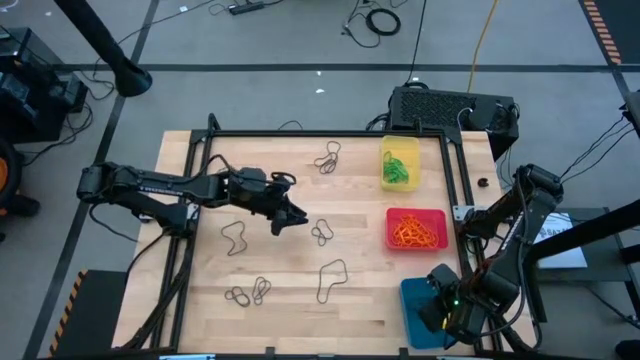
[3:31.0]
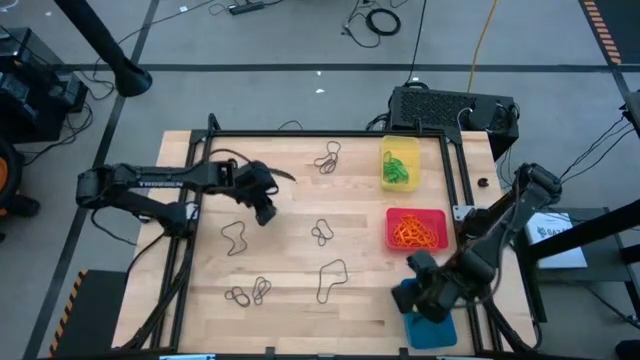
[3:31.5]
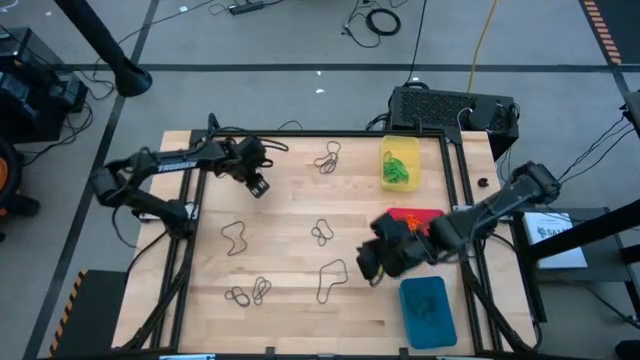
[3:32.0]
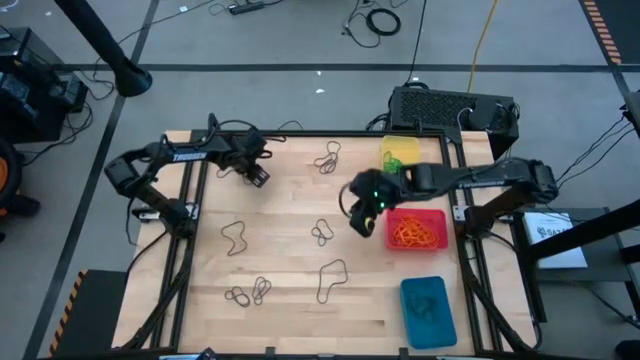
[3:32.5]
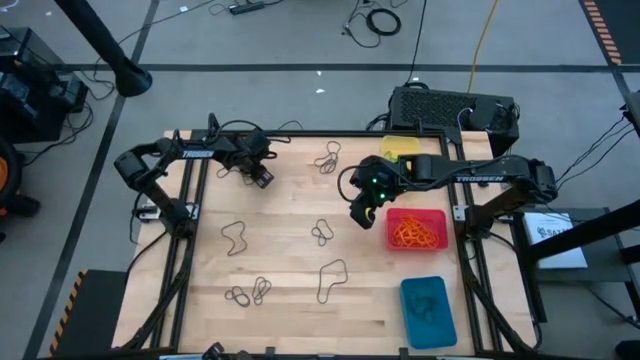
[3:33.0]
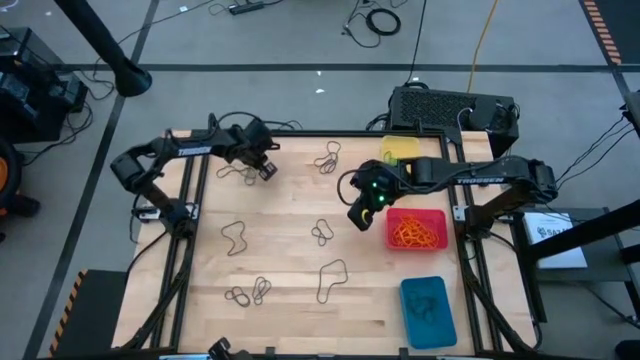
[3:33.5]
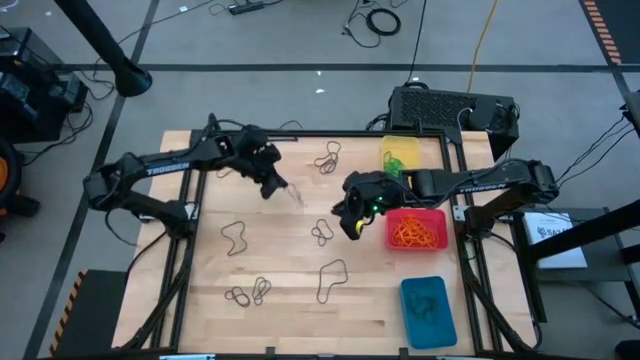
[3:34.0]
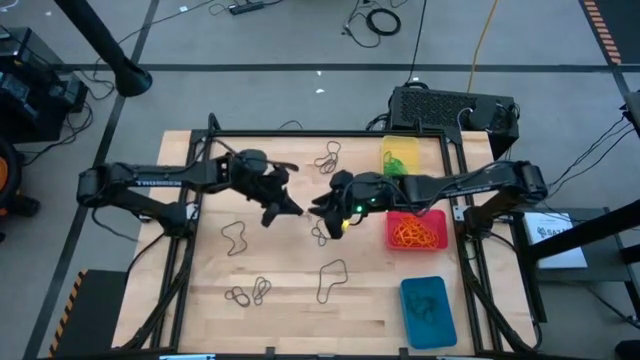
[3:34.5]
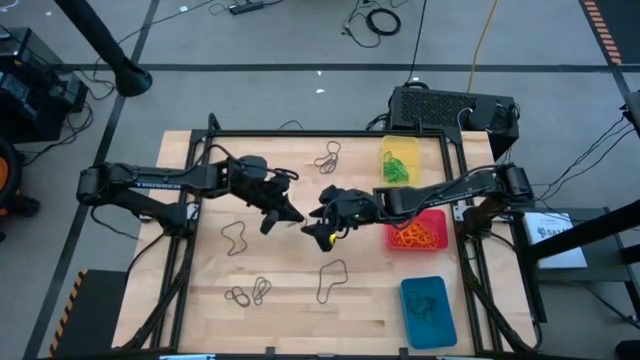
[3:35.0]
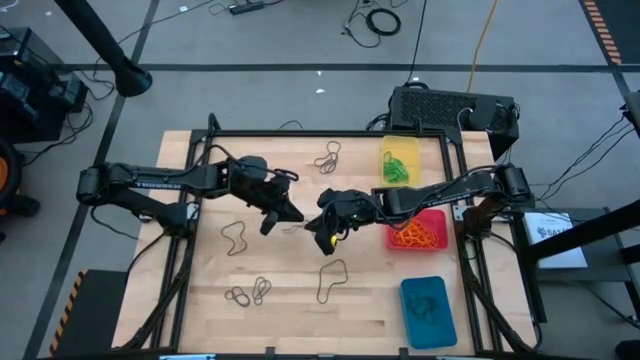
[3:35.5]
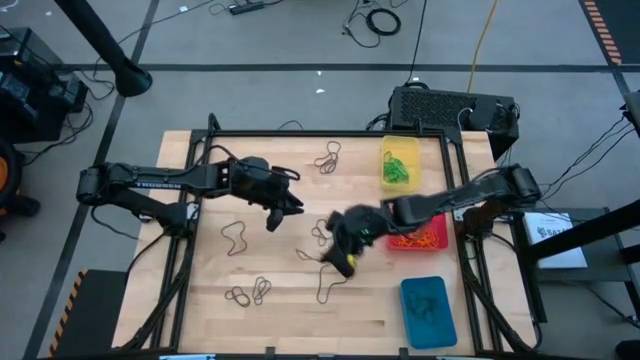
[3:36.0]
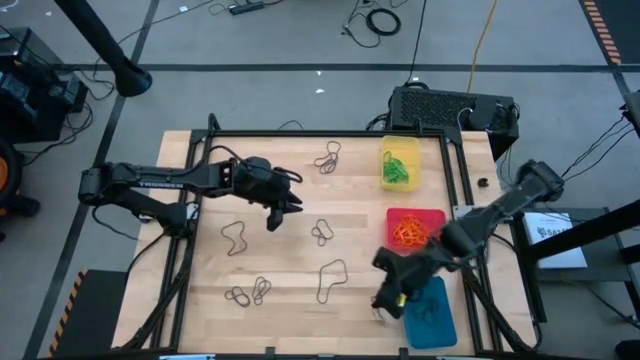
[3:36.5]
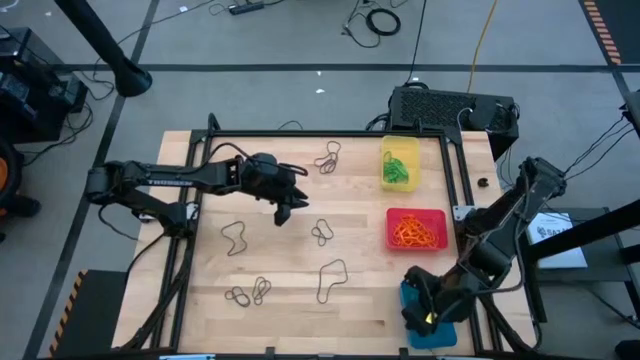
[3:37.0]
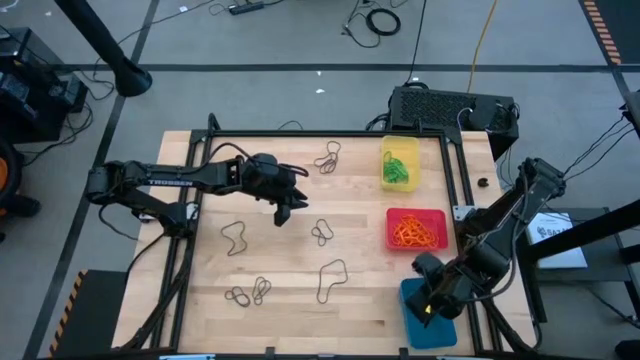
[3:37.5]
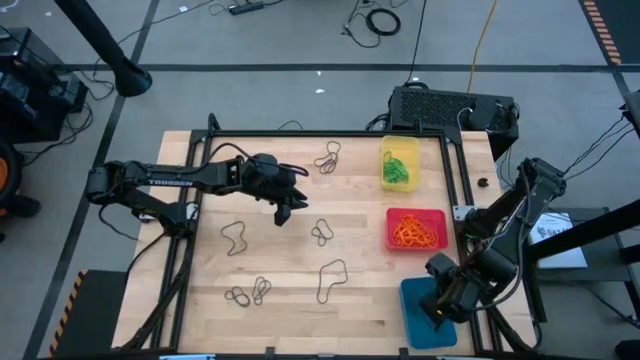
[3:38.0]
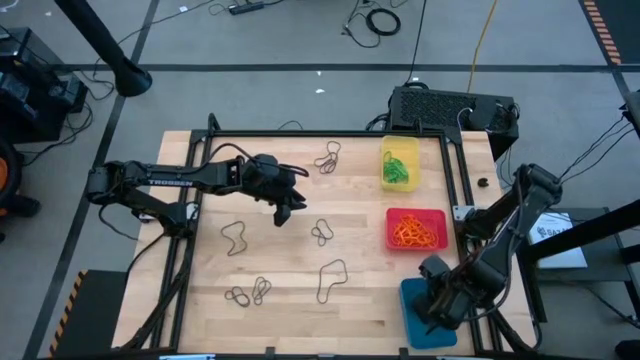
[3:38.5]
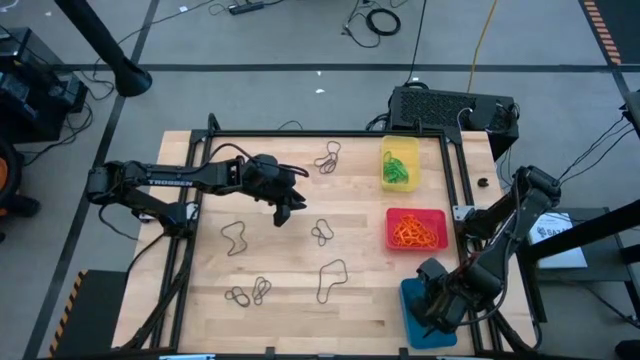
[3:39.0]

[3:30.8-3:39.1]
Task: Sort rubber bands into baskets
Put the violet rubber band into the blue bin

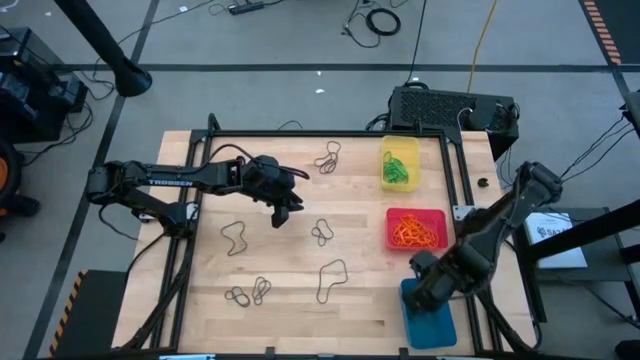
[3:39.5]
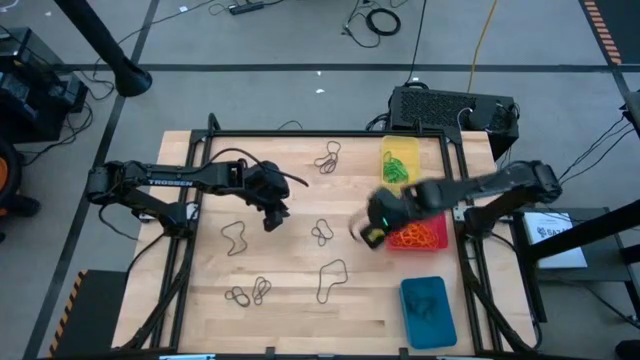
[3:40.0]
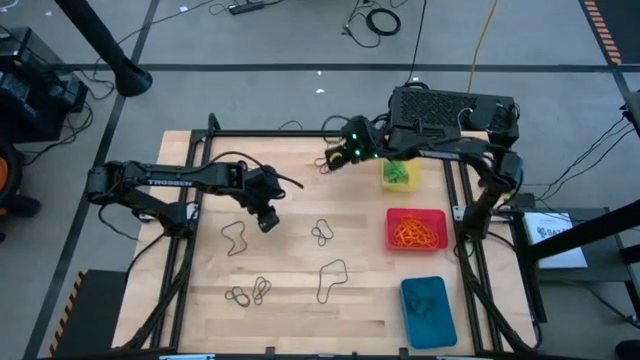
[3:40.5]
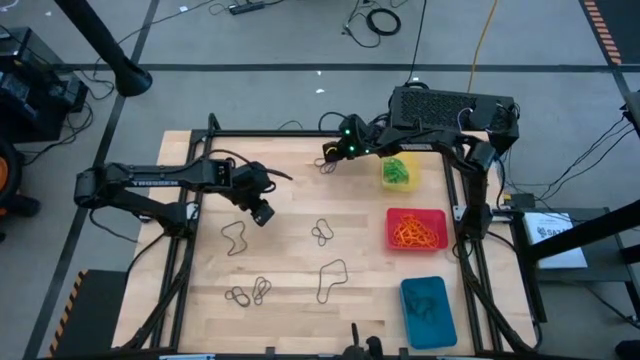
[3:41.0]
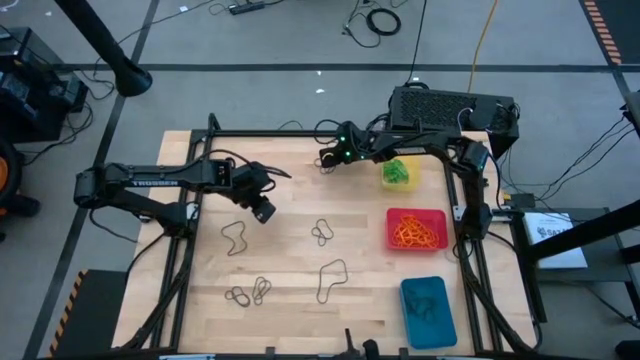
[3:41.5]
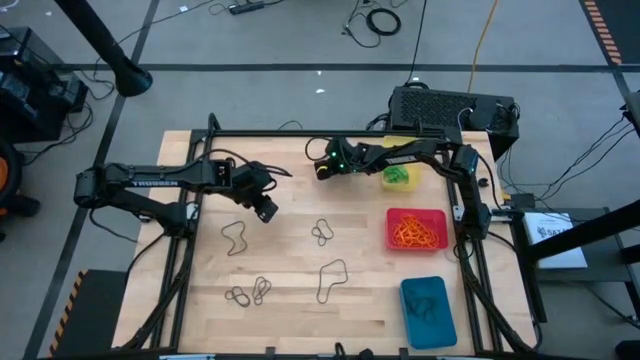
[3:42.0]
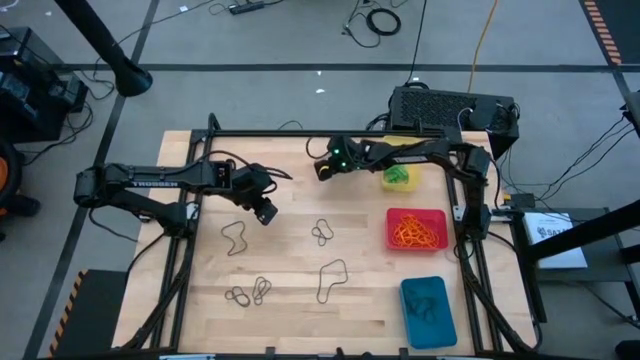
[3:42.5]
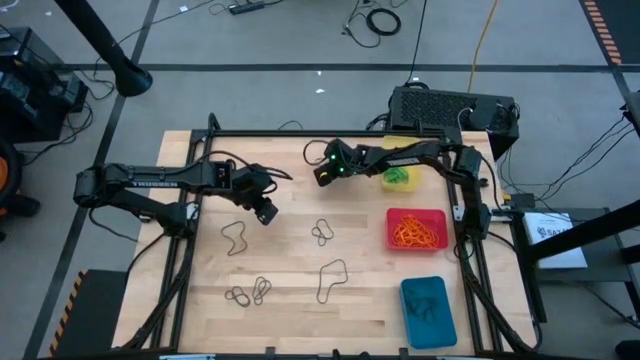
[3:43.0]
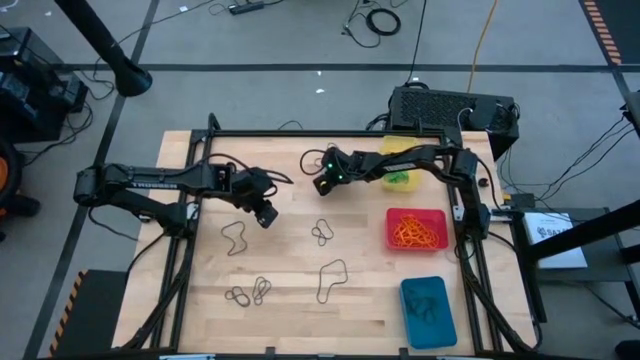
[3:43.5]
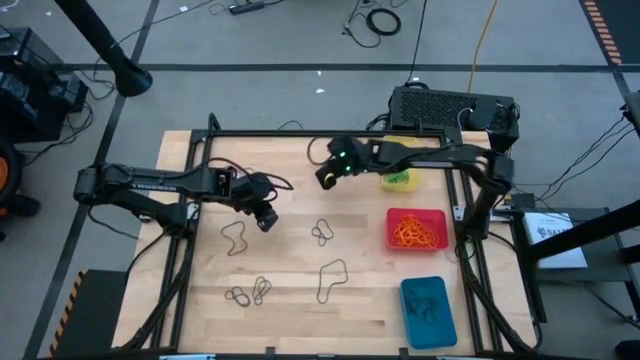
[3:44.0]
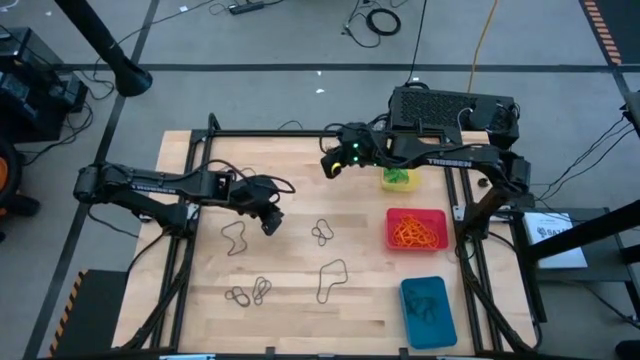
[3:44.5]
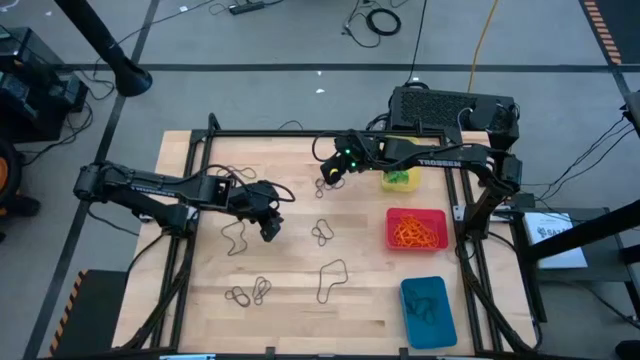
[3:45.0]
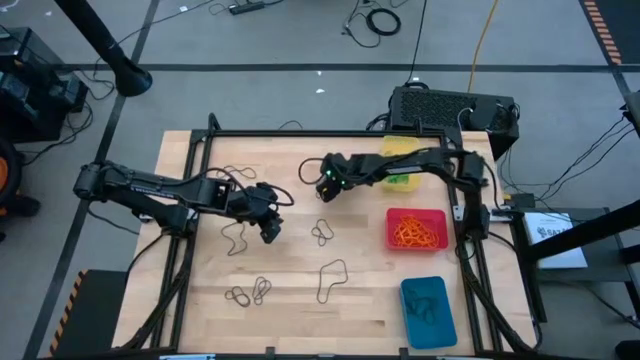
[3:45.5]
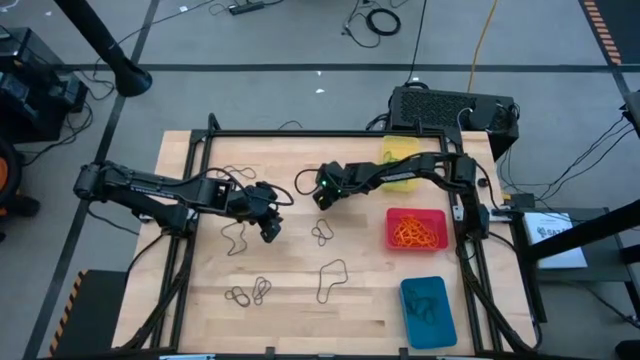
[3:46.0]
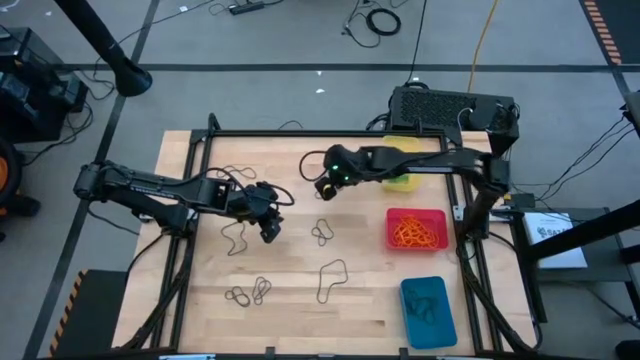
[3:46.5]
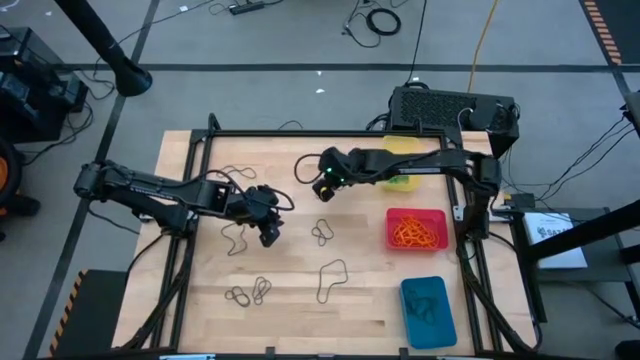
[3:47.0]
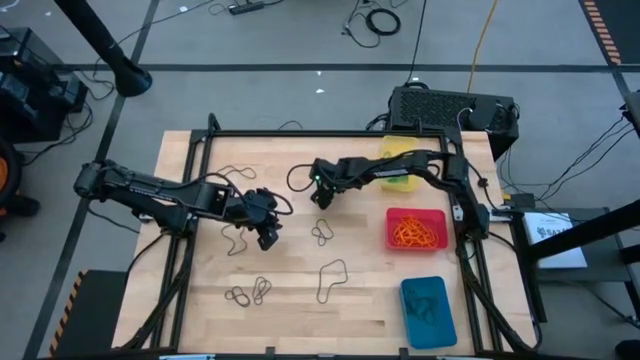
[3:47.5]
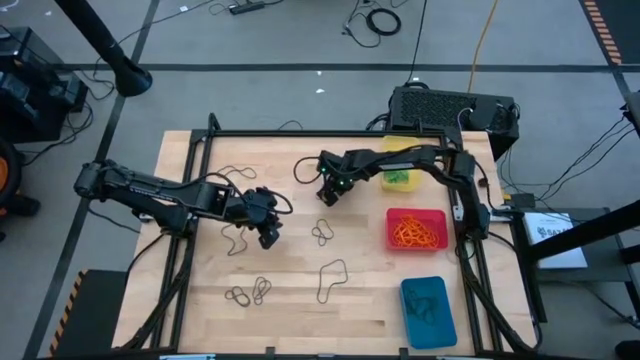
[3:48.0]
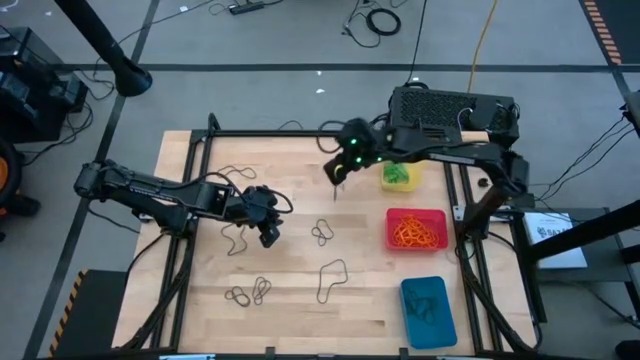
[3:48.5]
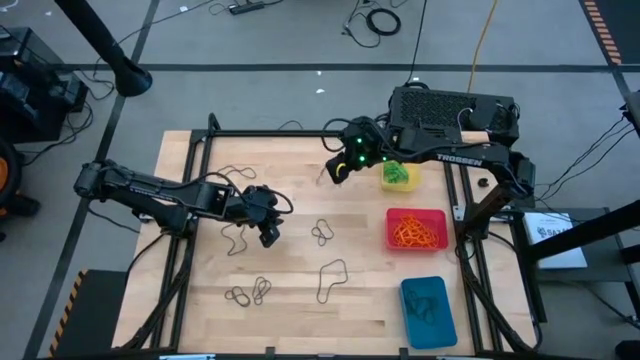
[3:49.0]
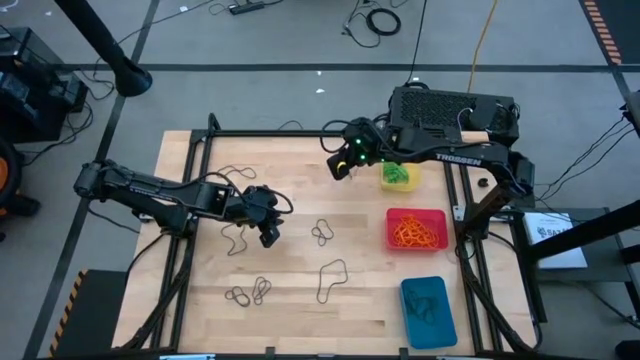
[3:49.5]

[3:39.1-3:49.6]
Put the violet rubber band into the blue bin

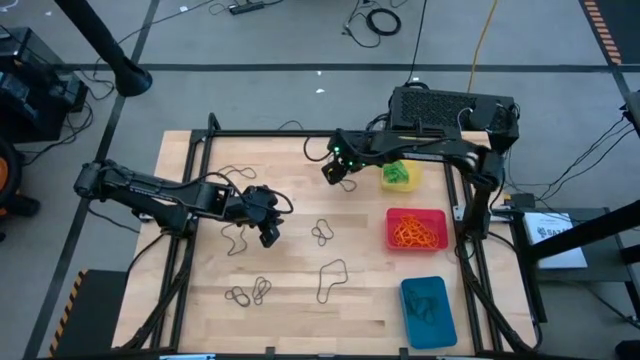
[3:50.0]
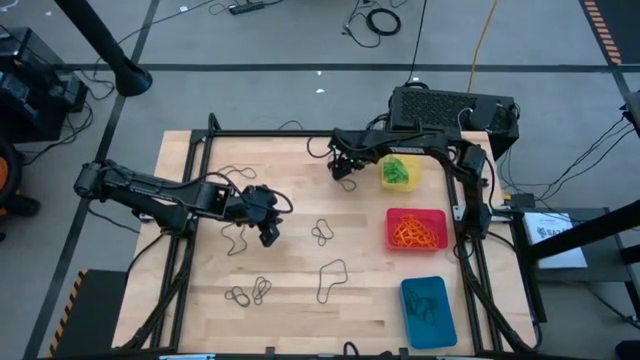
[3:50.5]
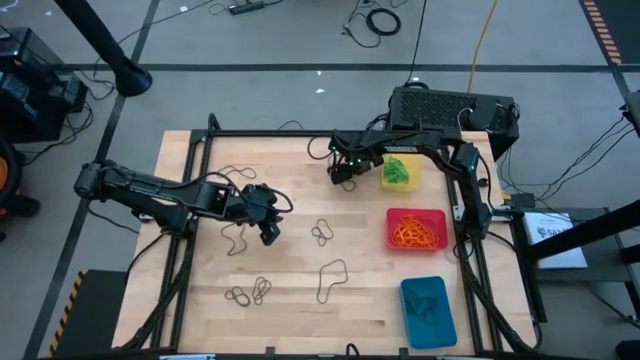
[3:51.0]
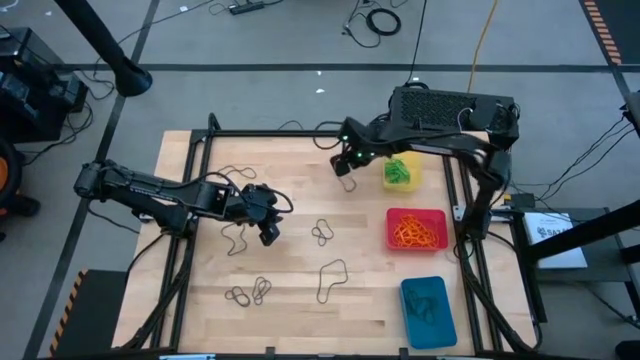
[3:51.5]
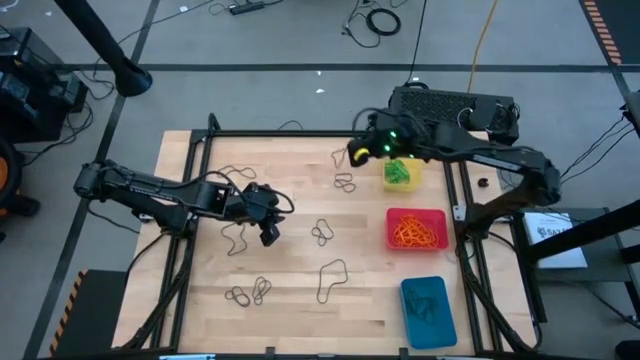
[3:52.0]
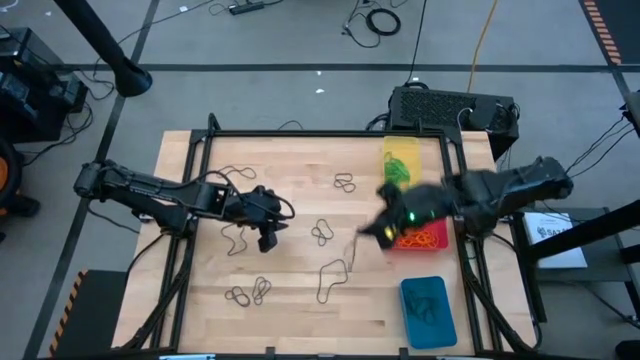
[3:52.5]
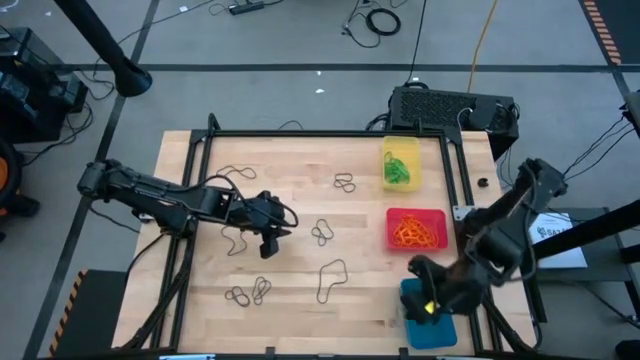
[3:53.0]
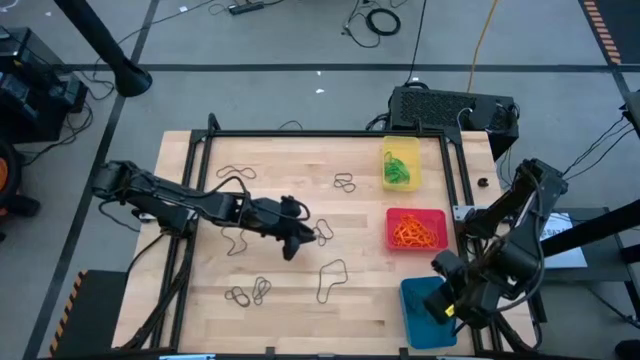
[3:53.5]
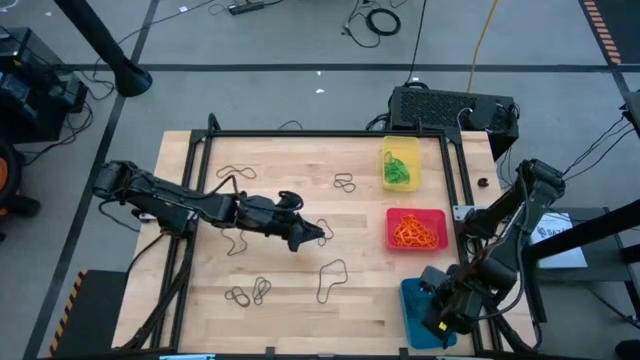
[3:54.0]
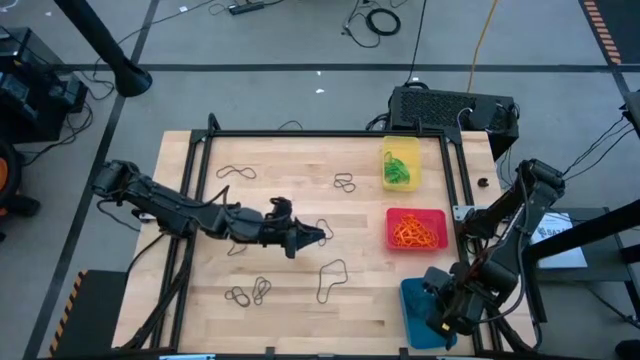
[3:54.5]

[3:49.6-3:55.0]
Put the violet rubber band into the blue bin
